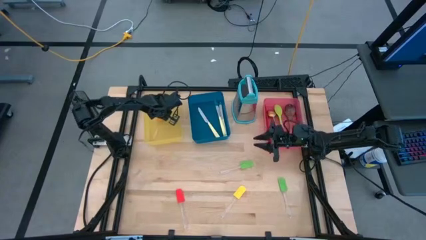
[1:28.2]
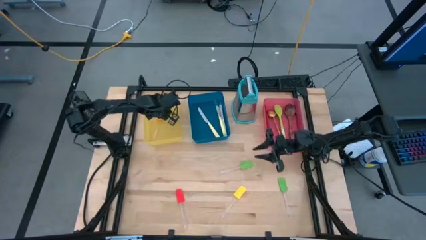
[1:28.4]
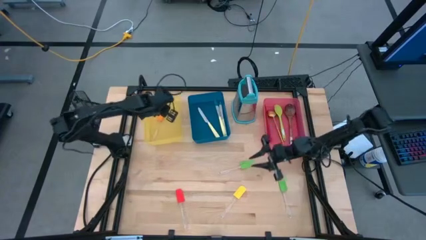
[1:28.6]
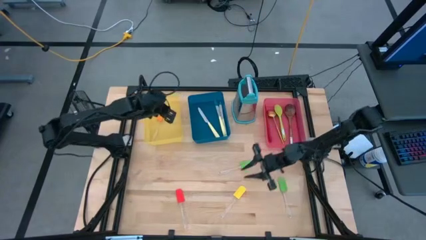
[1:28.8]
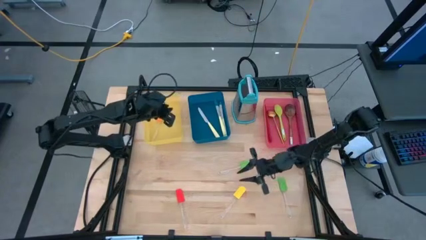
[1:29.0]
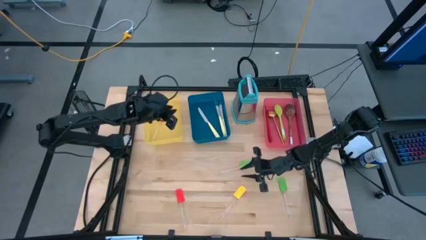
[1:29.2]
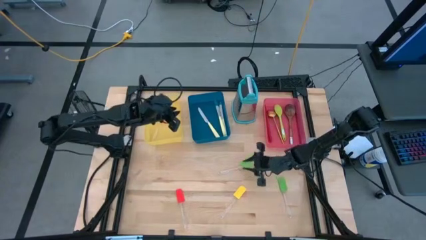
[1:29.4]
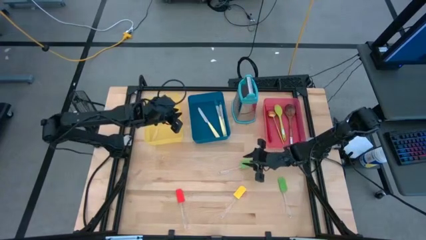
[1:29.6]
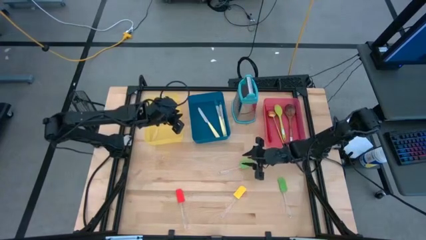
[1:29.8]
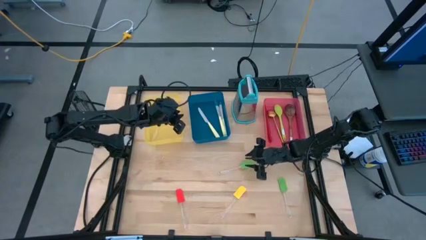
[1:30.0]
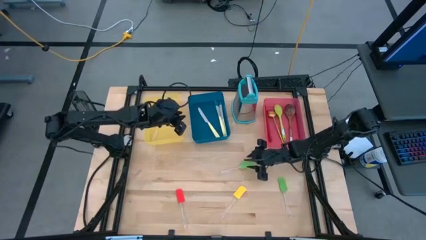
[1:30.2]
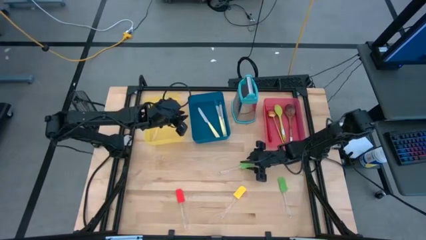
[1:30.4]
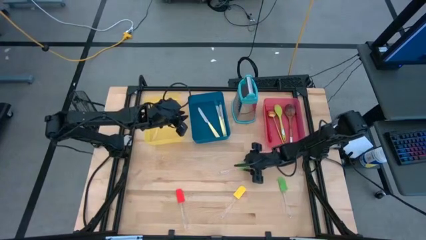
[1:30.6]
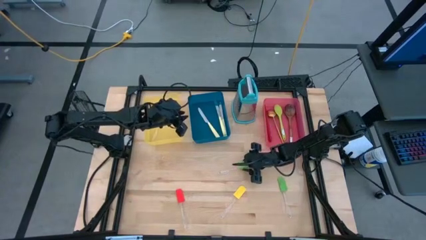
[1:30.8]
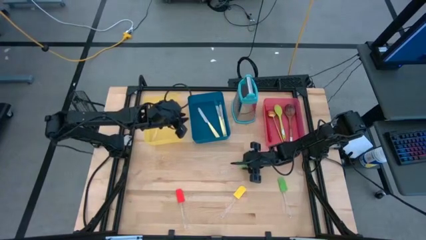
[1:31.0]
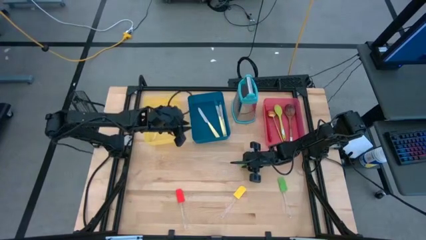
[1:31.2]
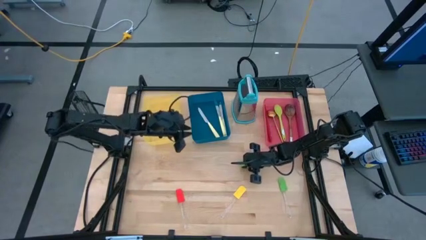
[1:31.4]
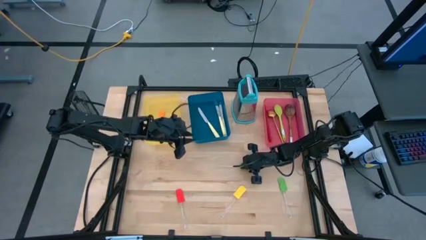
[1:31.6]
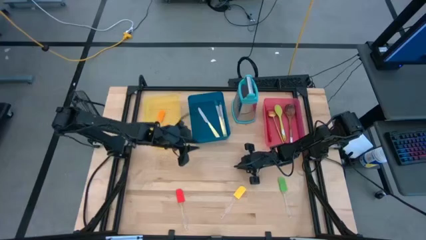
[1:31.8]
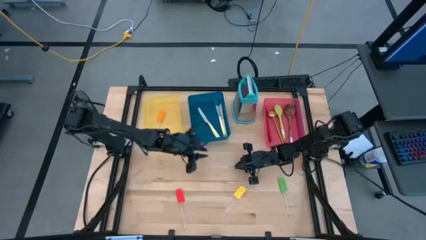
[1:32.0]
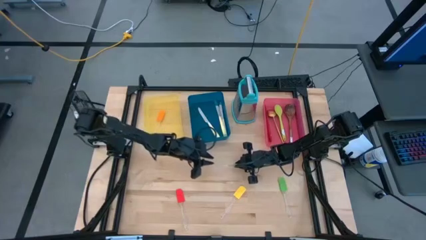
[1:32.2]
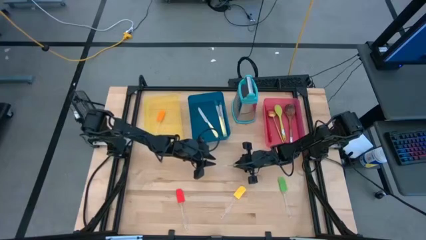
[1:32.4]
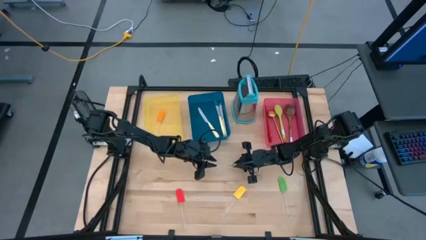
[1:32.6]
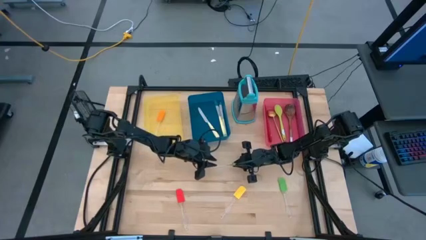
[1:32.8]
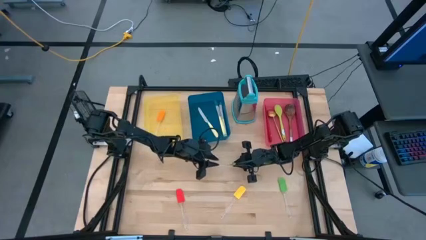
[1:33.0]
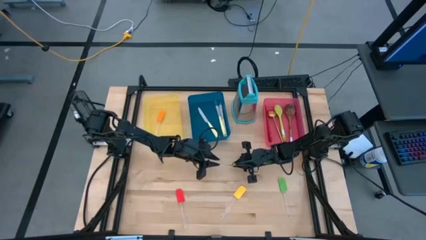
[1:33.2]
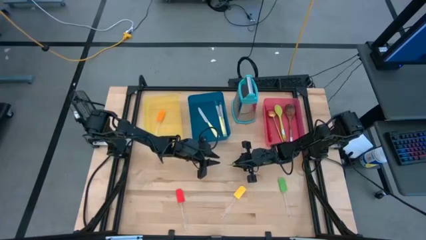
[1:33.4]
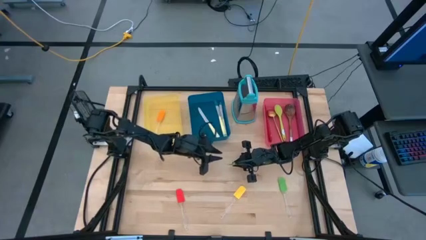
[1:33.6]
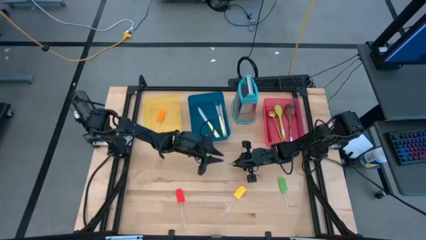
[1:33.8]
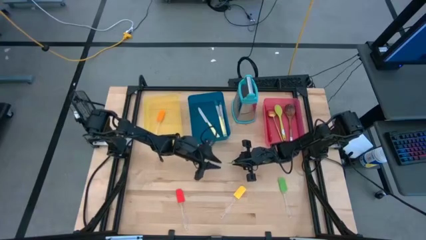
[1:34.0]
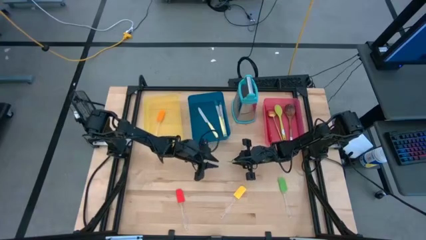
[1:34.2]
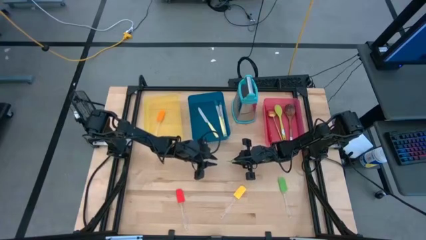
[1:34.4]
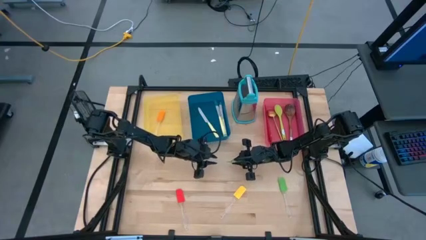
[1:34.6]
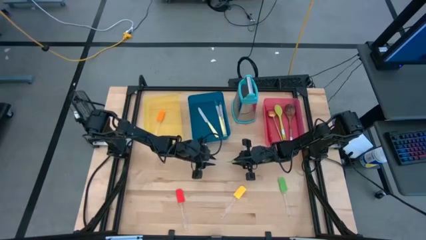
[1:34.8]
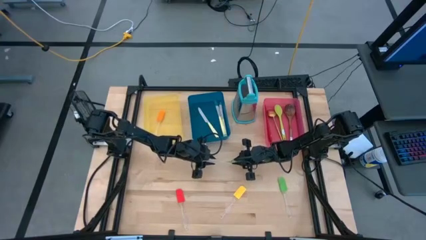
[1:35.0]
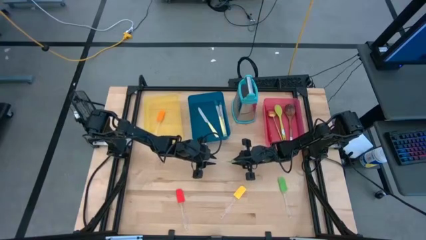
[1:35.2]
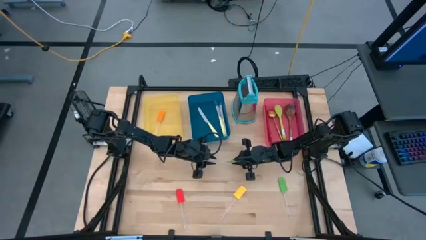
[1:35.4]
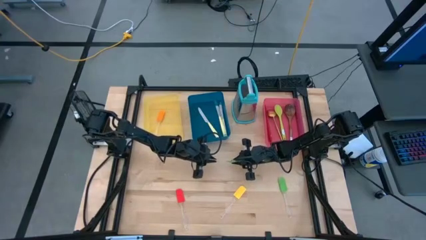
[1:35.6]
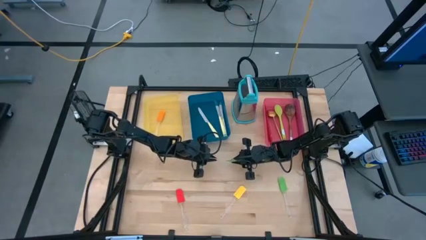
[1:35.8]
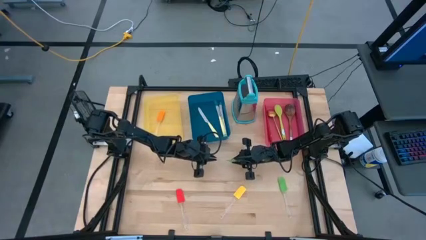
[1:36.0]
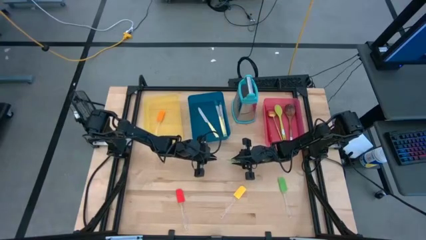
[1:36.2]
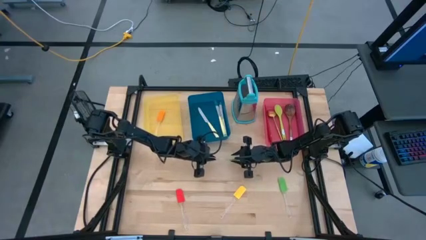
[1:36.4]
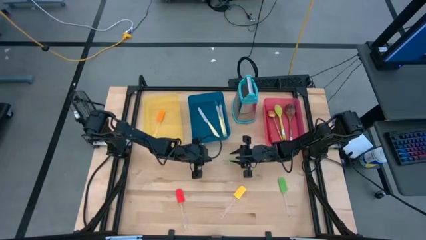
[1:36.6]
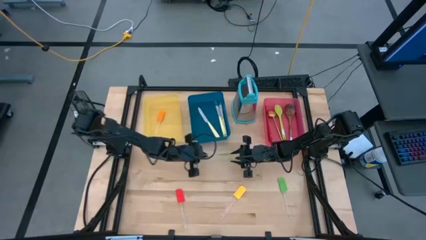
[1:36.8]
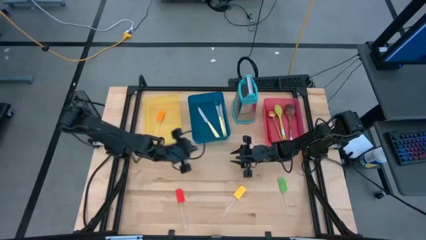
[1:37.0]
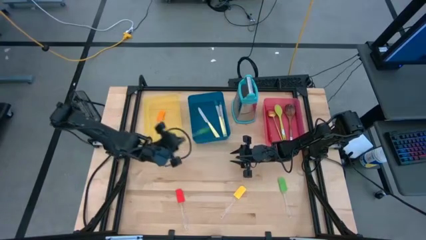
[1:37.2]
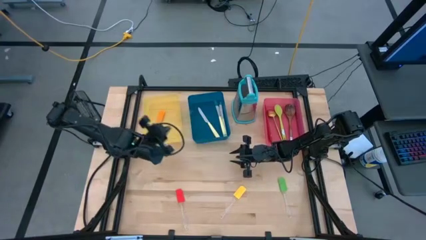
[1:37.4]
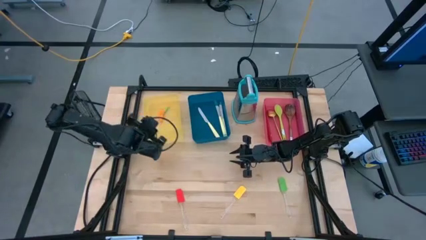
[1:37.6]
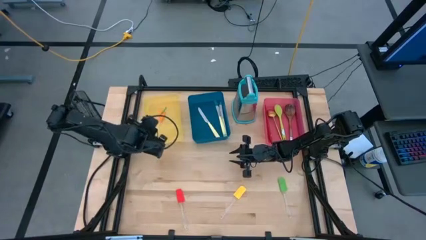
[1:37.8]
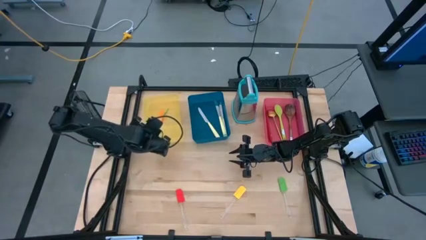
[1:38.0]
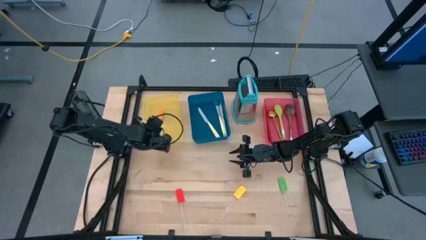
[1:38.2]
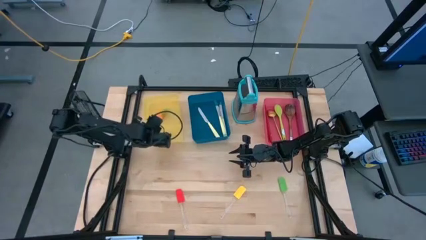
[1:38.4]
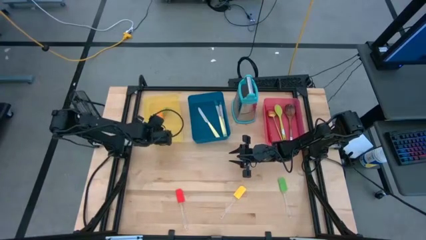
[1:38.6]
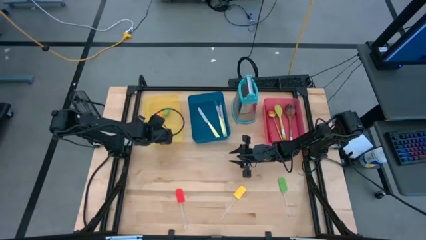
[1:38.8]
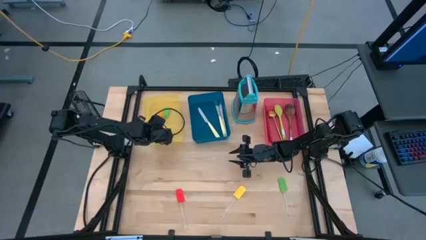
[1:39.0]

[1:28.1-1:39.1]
Task: Pick & Place Kitchen Items
Put the top green spatula into the yellow bin

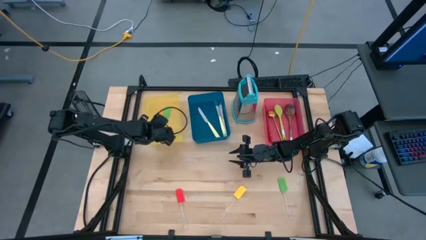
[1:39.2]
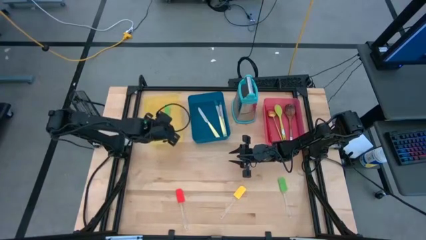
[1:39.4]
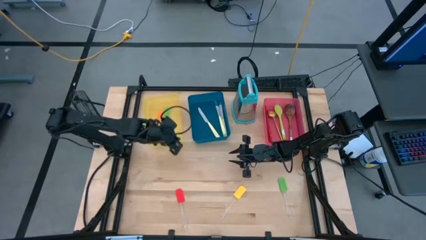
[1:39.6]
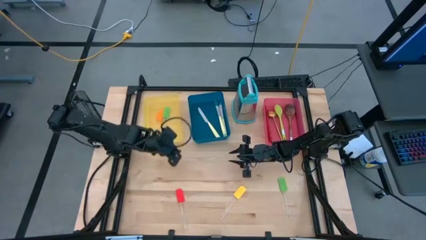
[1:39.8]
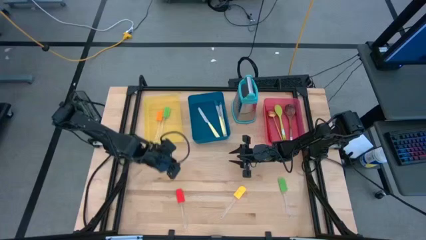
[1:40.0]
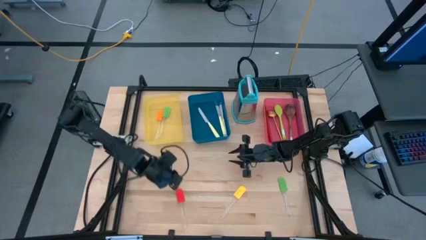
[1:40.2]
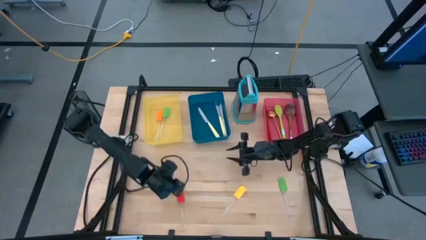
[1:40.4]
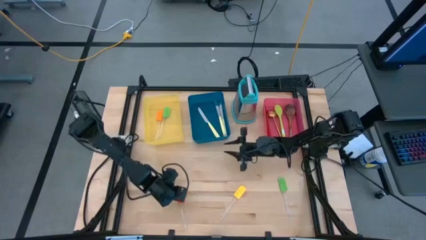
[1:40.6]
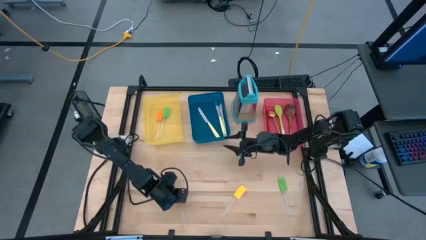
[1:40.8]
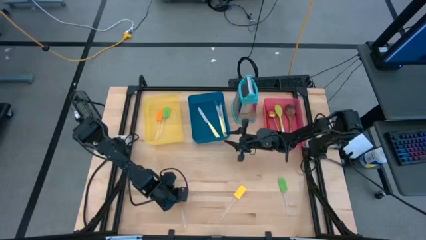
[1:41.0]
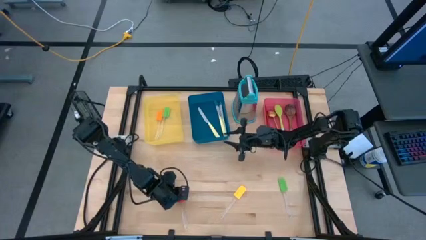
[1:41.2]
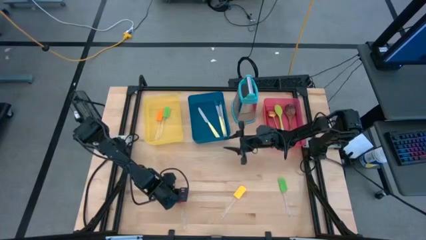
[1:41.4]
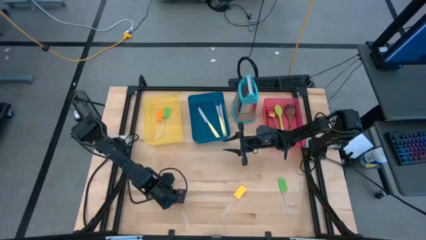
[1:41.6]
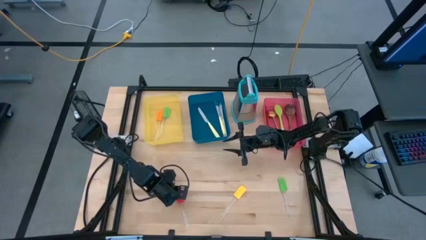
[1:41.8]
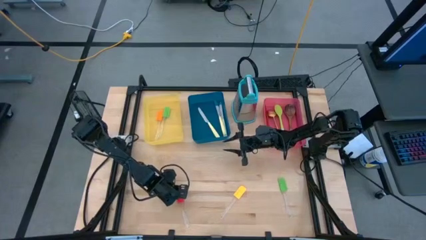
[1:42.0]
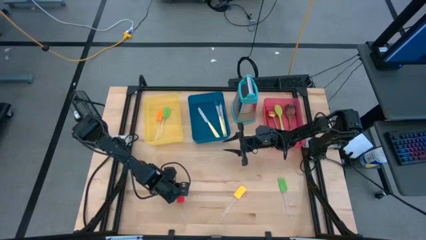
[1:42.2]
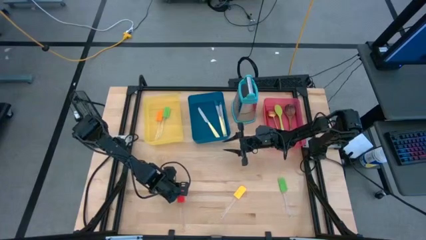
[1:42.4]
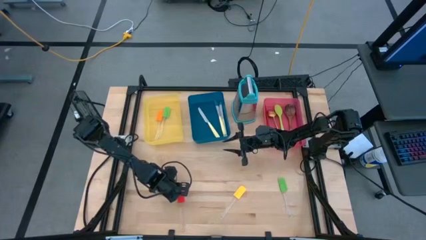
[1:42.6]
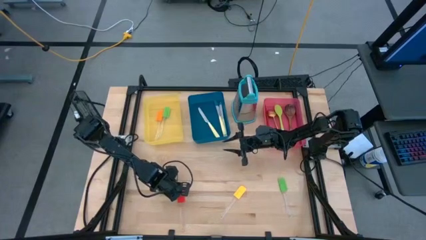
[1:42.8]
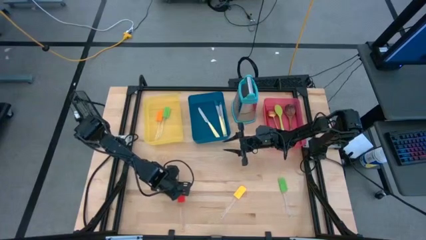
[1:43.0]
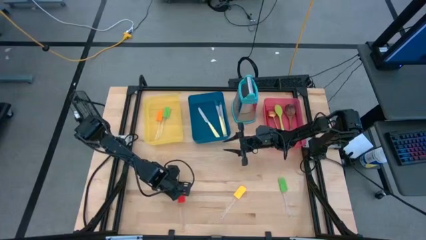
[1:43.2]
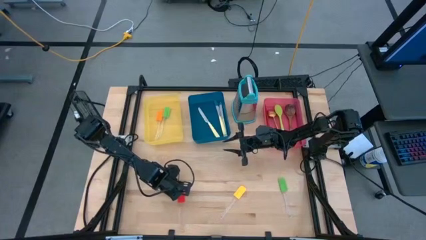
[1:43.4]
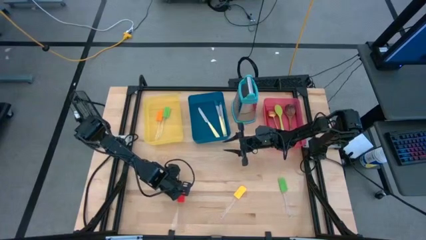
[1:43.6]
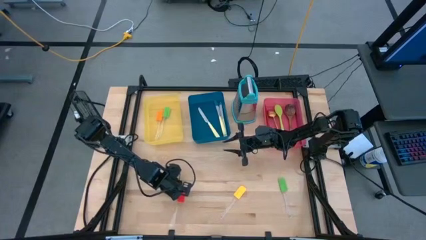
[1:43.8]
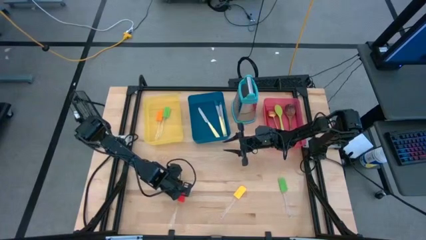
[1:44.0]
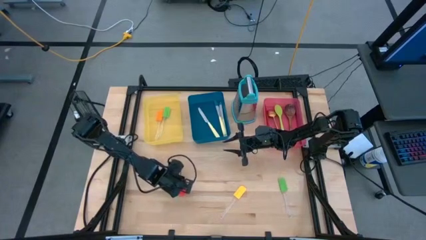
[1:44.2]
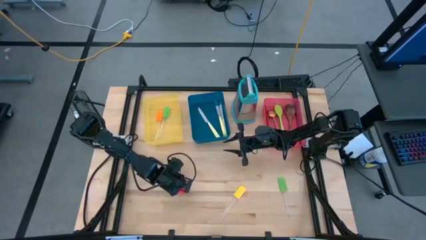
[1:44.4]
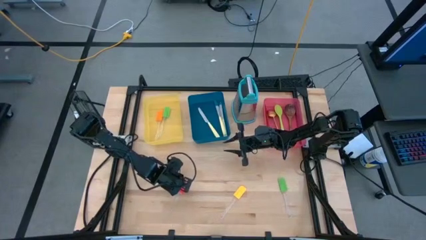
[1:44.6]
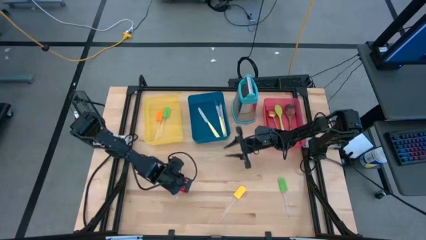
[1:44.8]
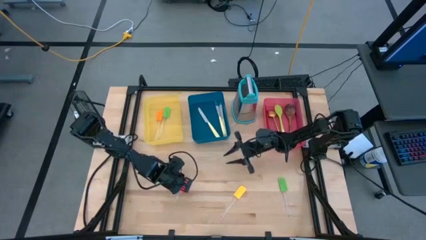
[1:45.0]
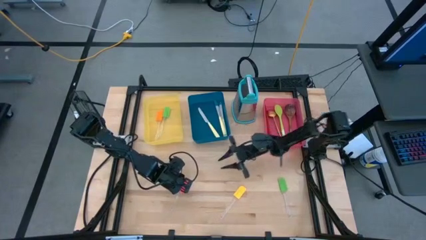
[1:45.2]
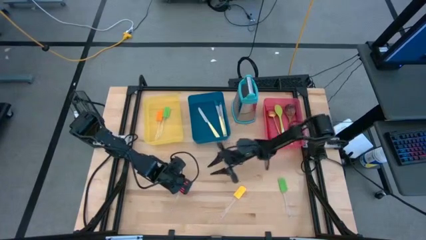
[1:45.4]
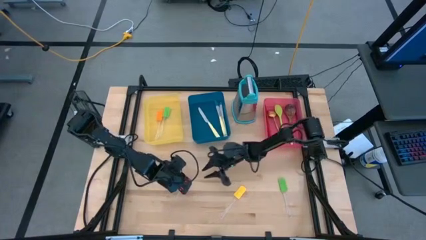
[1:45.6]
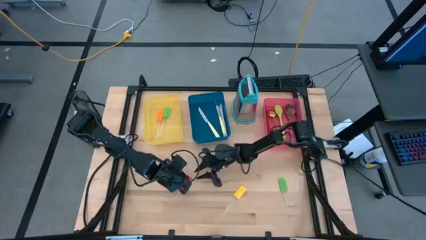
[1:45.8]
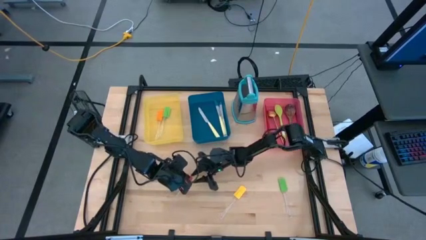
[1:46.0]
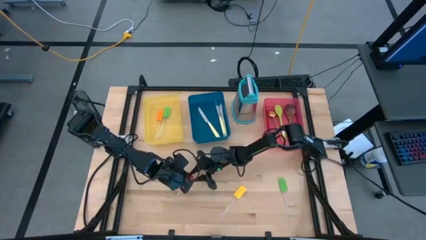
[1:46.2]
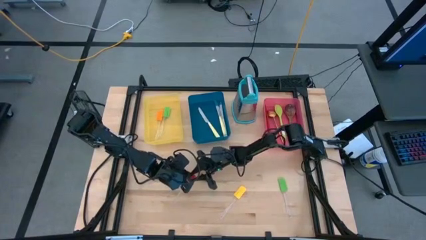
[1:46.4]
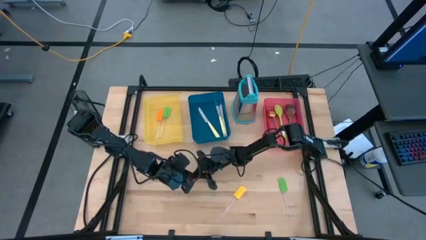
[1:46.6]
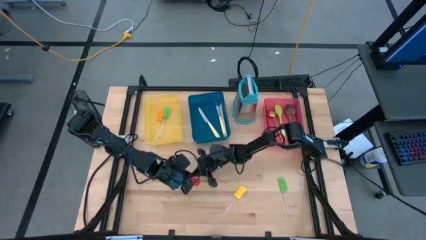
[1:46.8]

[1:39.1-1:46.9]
Put the red spatula into the yellow bin
